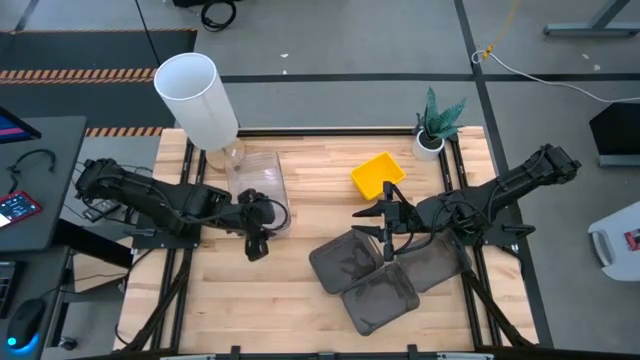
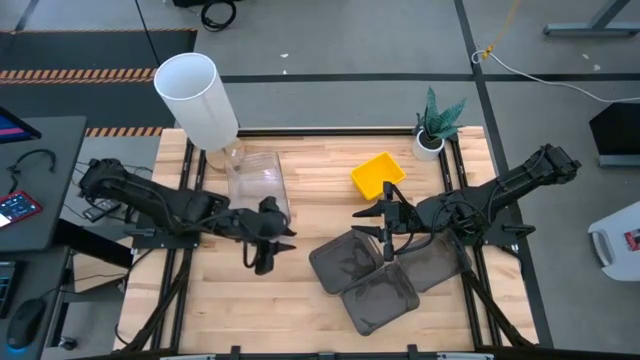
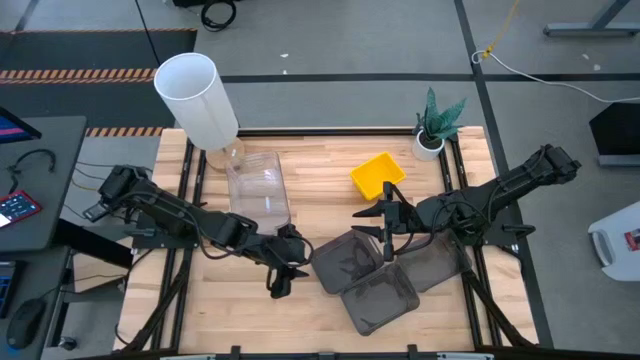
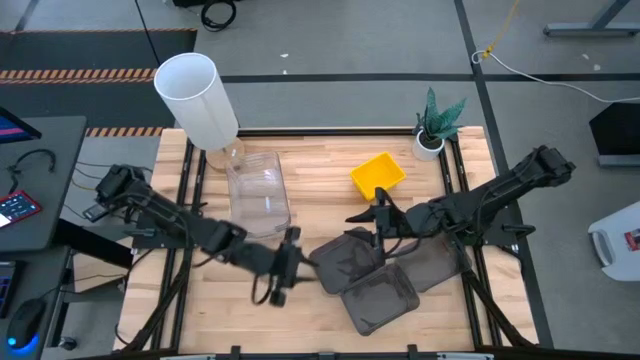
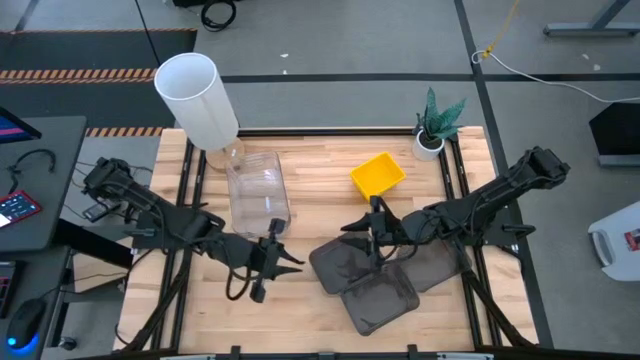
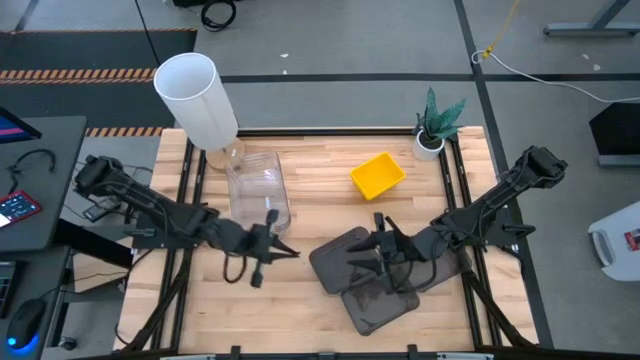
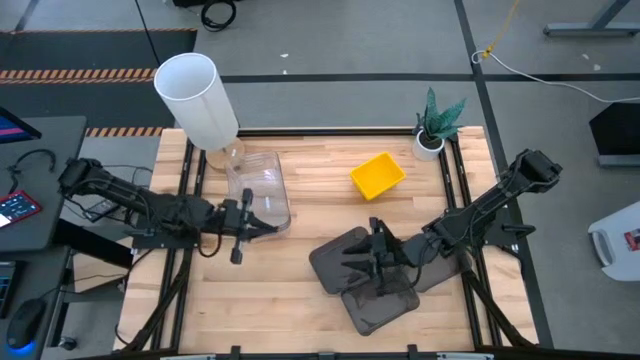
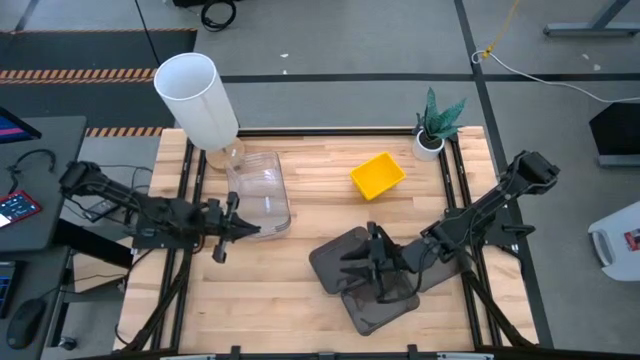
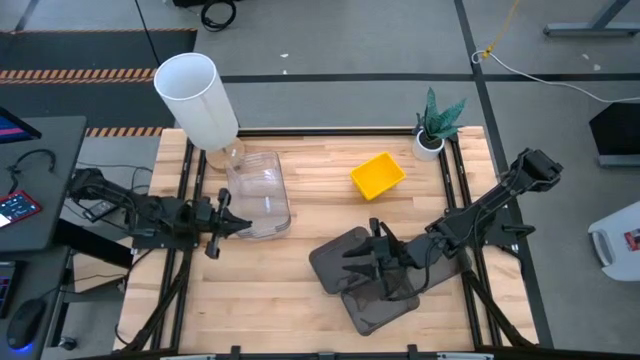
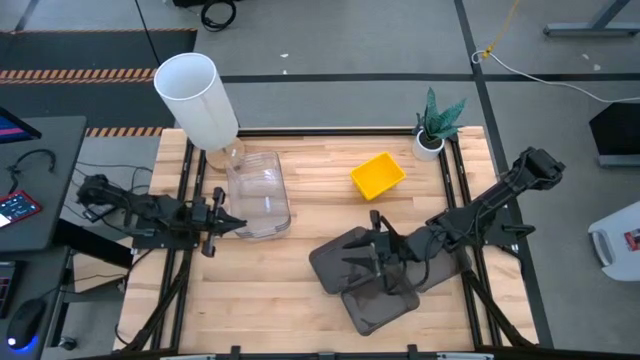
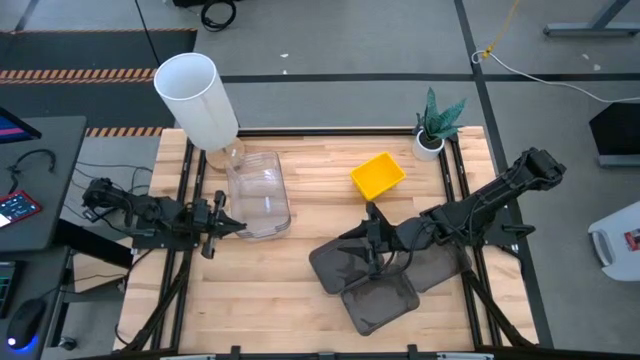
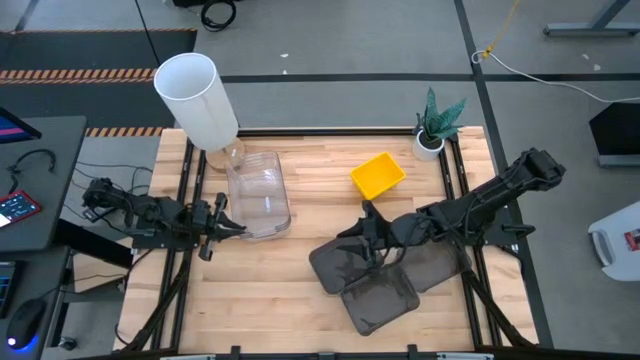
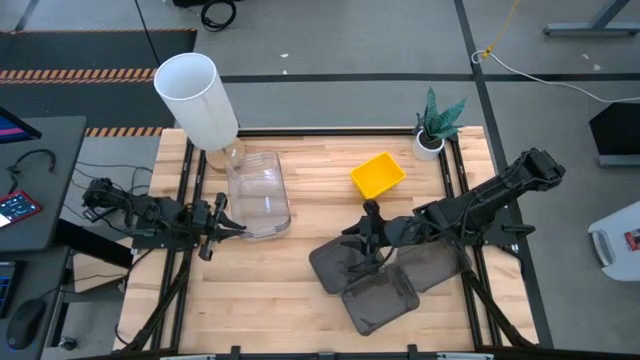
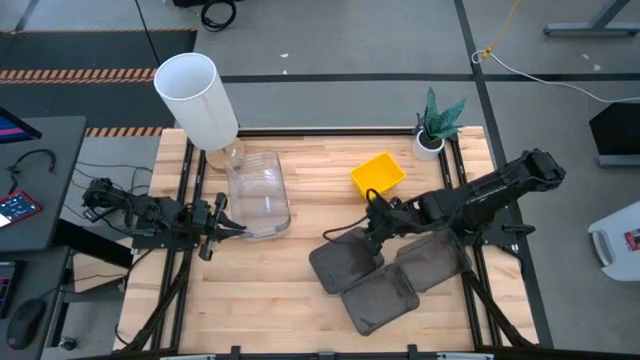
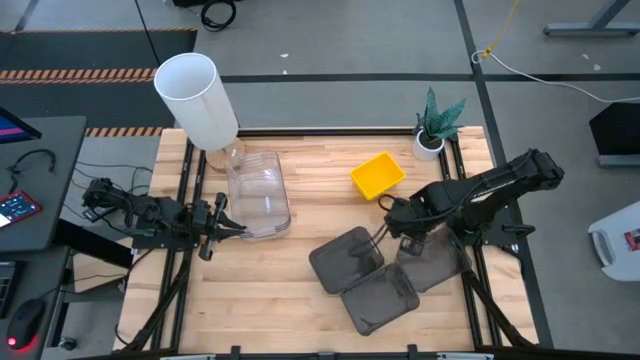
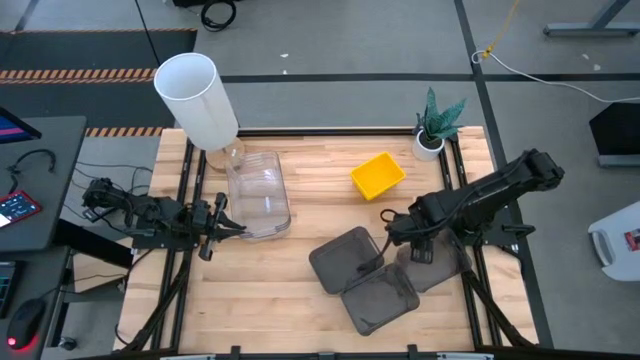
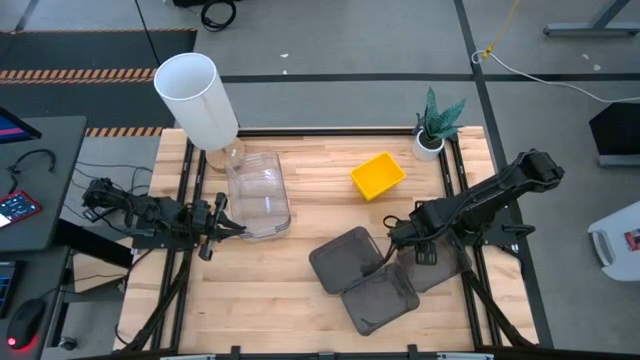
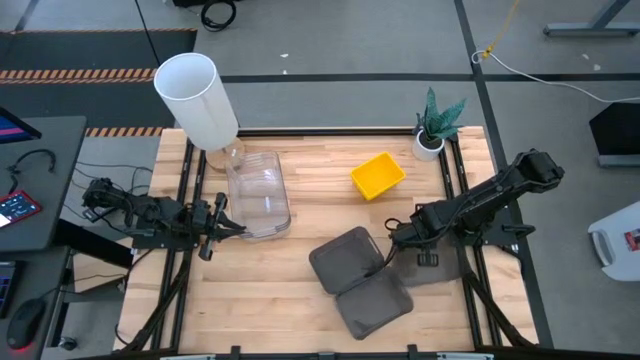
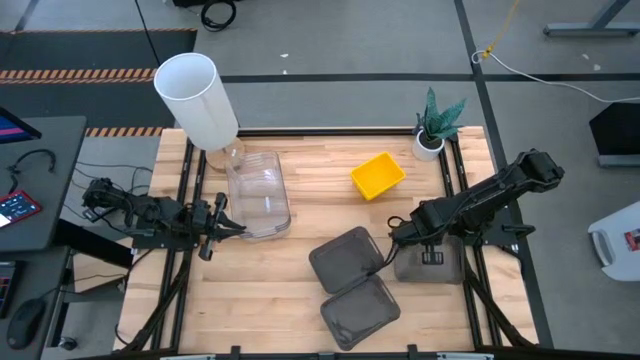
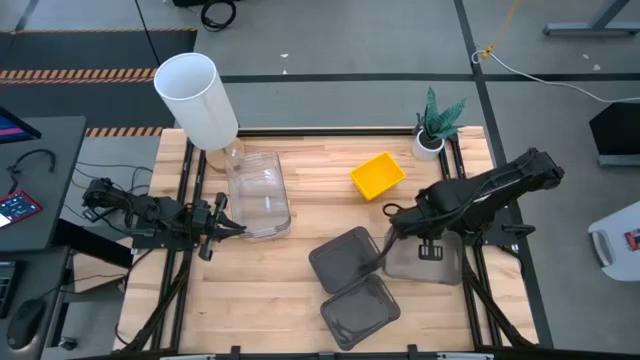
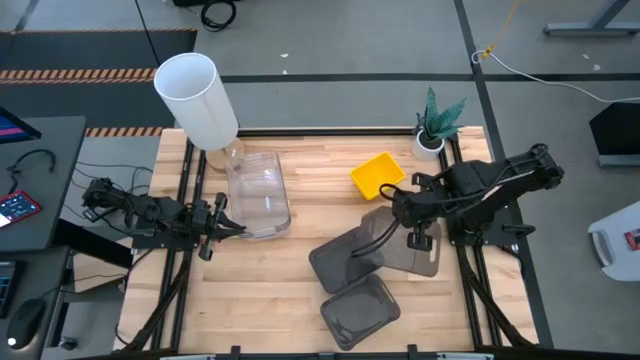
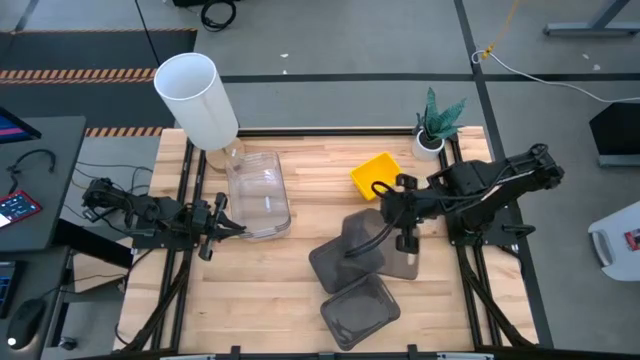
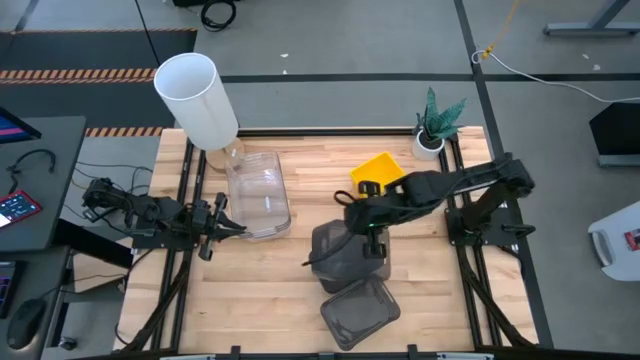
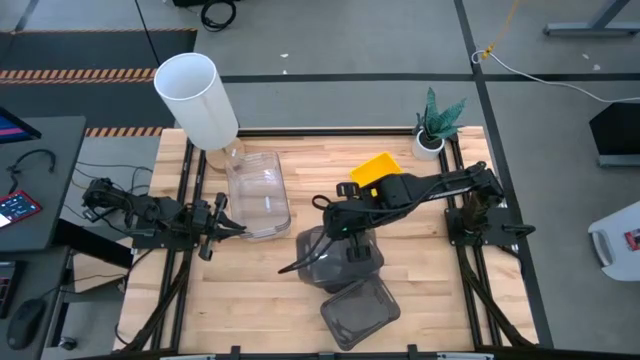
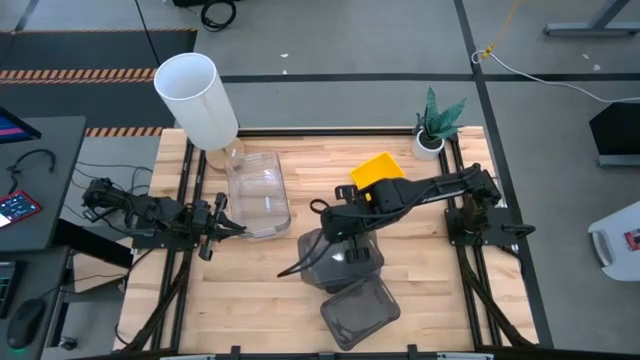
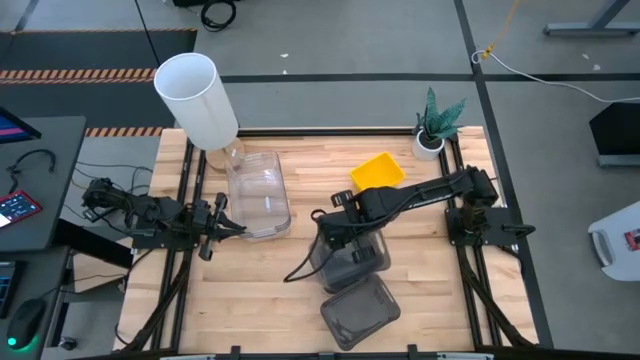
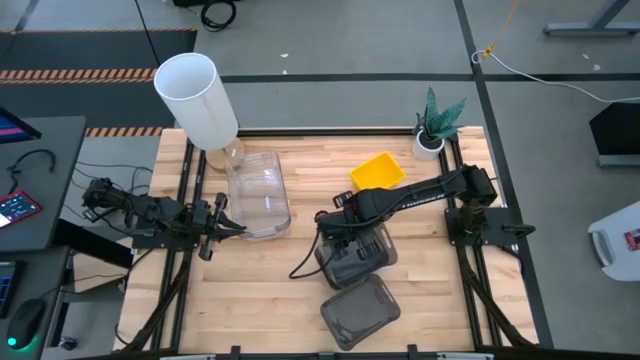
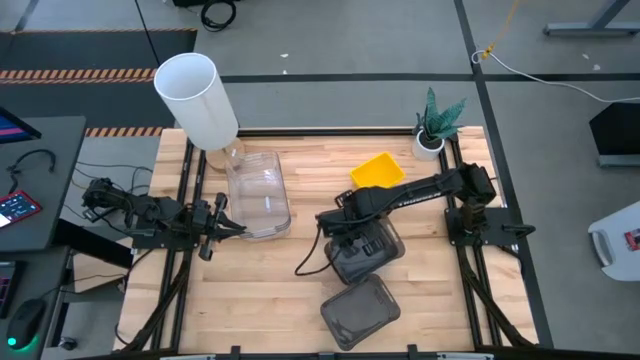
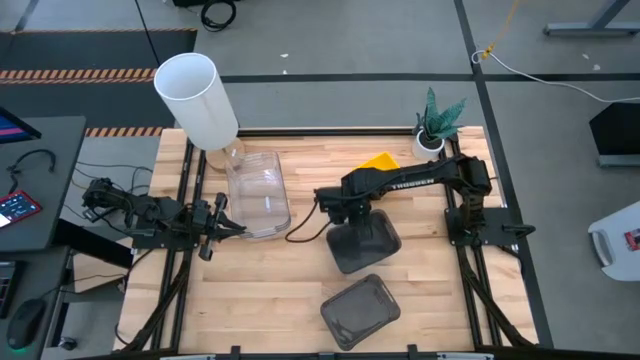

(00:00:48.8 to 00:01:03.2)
Stack the top right black bin on top of the top left black bin

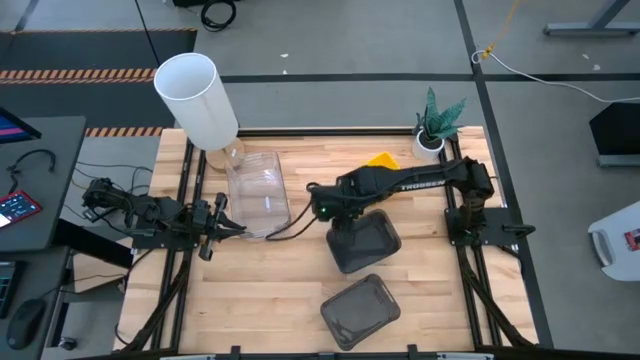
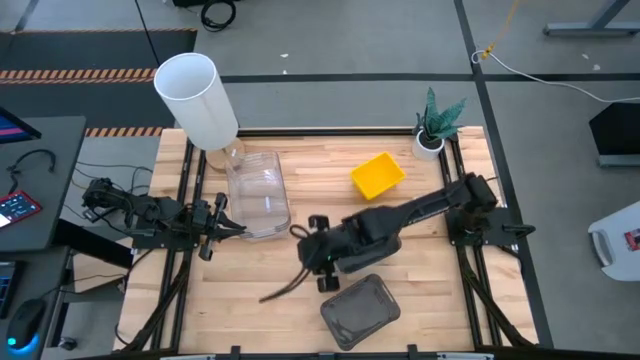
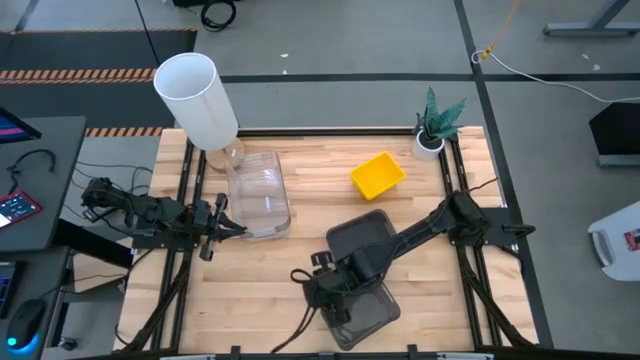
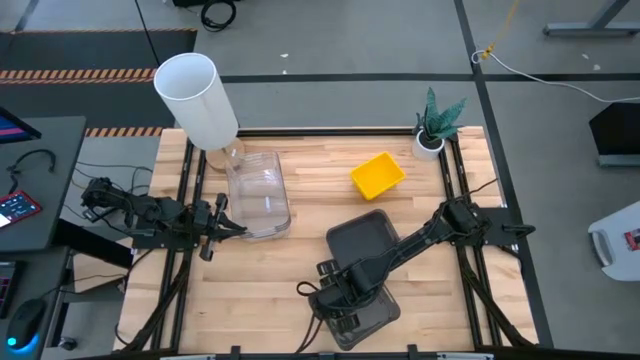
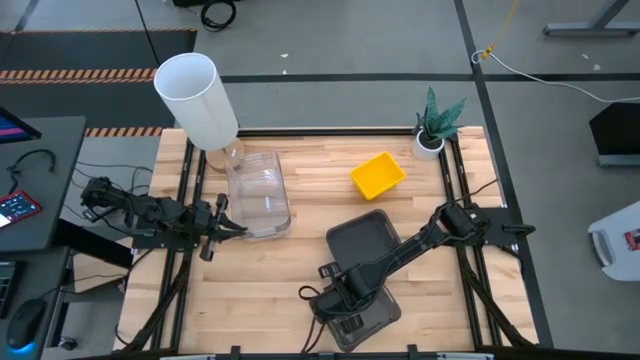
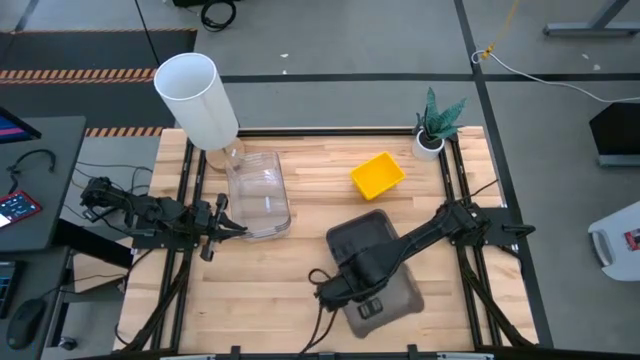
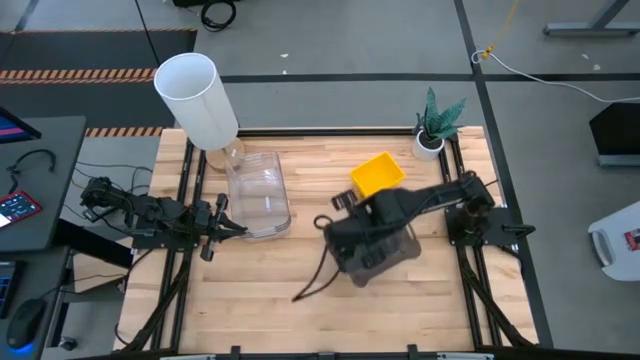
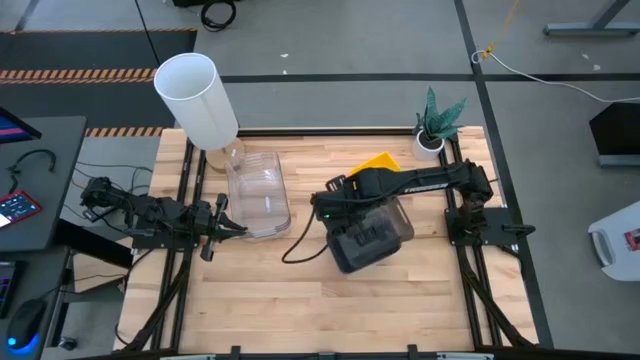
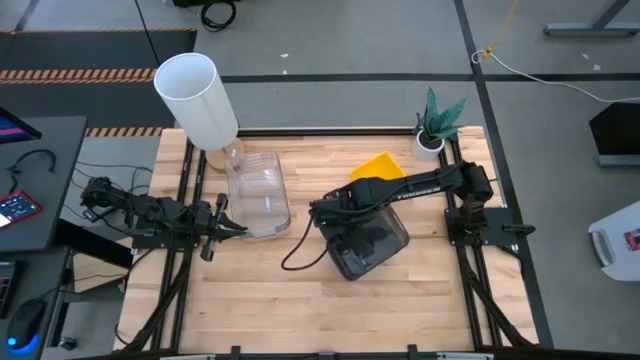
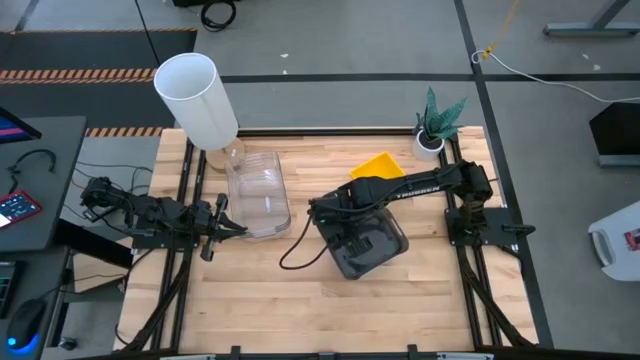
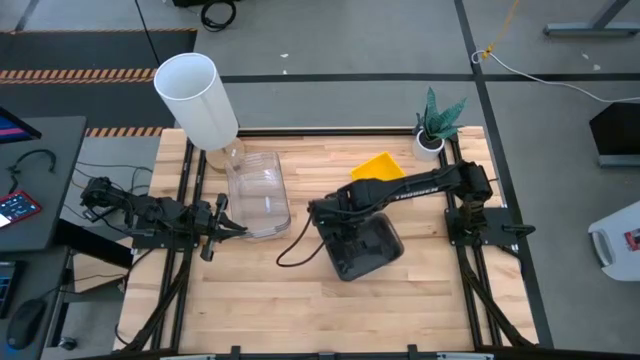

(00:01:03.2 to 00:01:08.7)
Stack the bottom black bin on top of the top black bin
